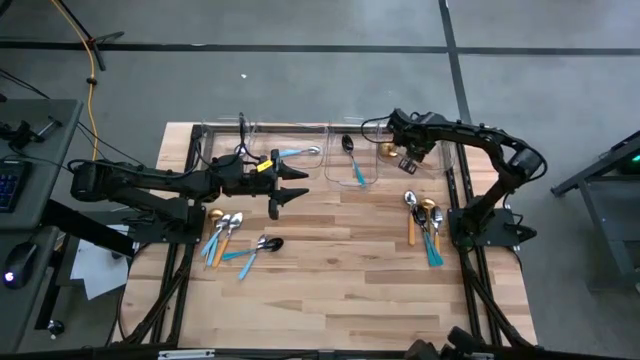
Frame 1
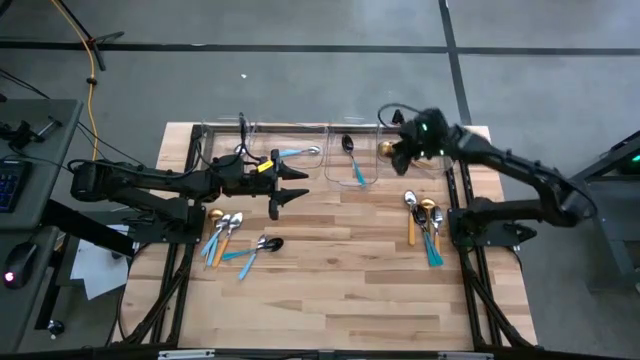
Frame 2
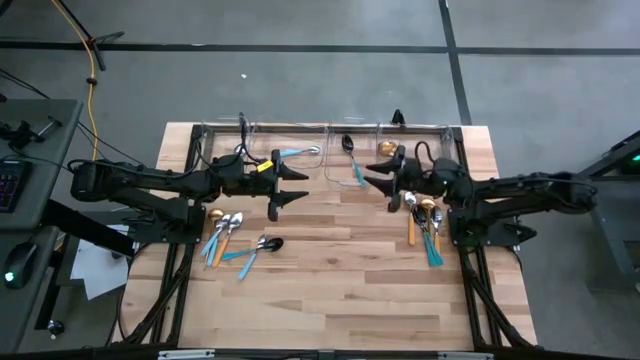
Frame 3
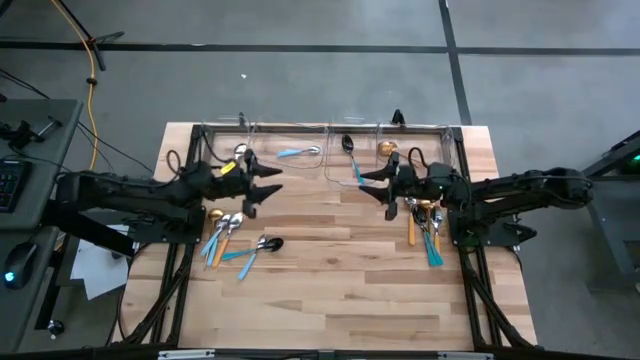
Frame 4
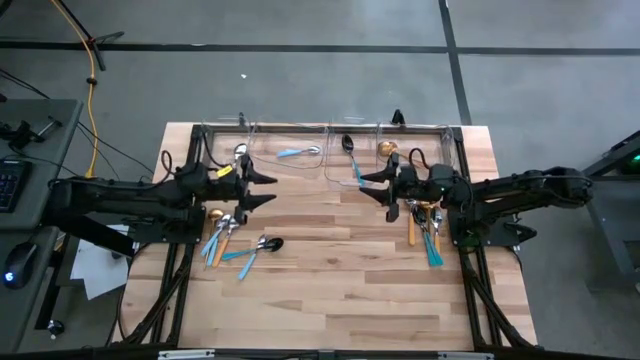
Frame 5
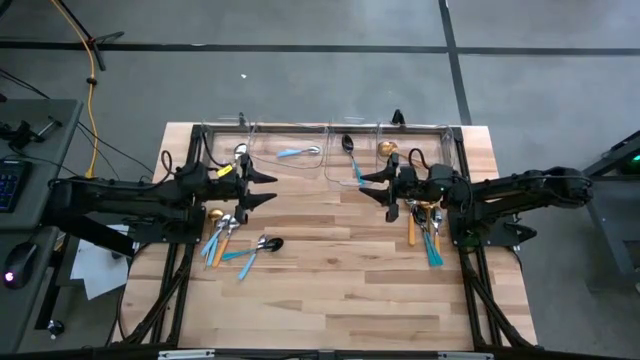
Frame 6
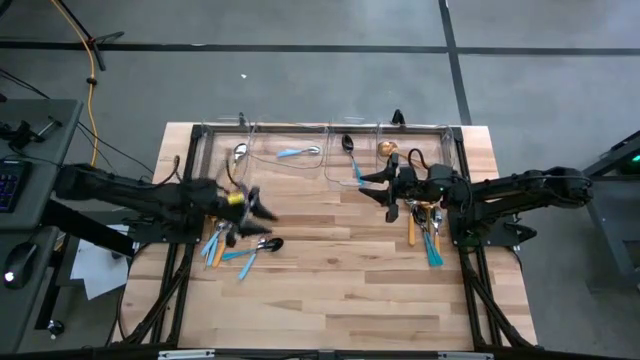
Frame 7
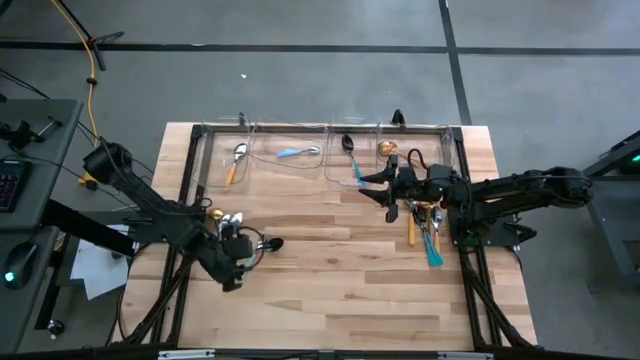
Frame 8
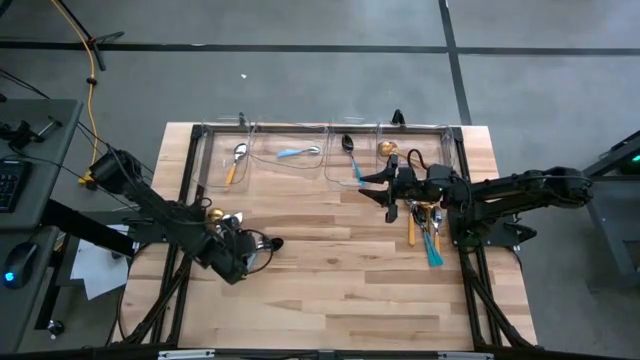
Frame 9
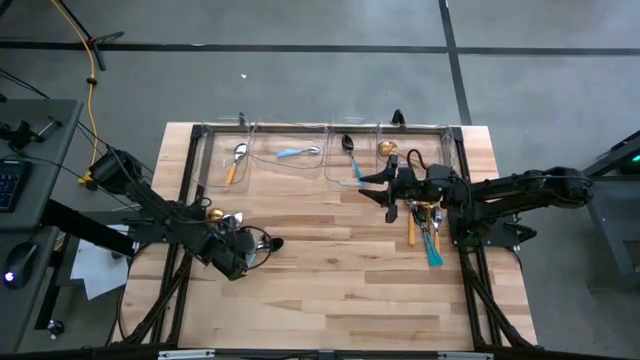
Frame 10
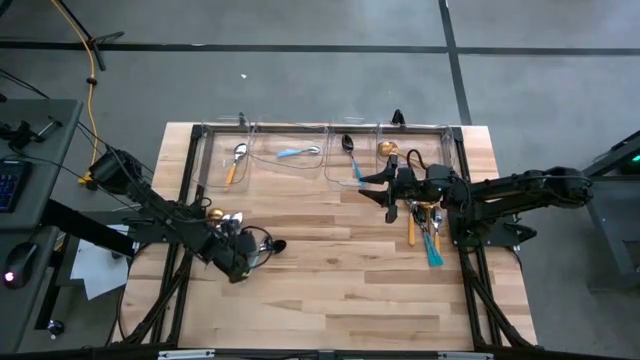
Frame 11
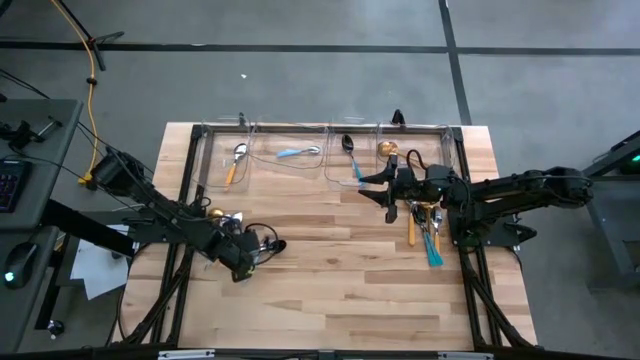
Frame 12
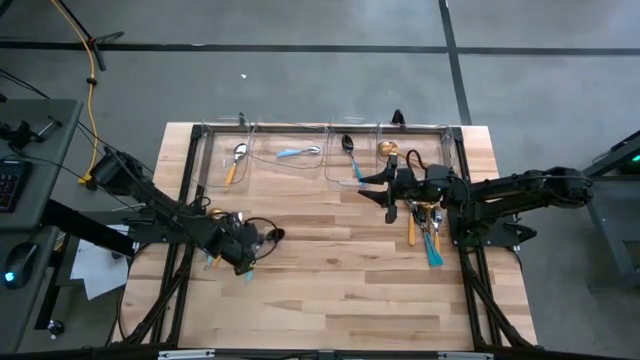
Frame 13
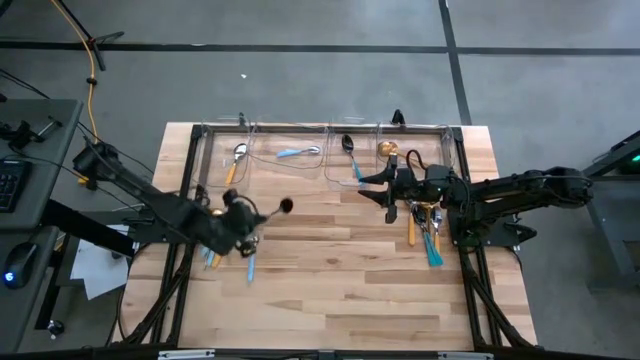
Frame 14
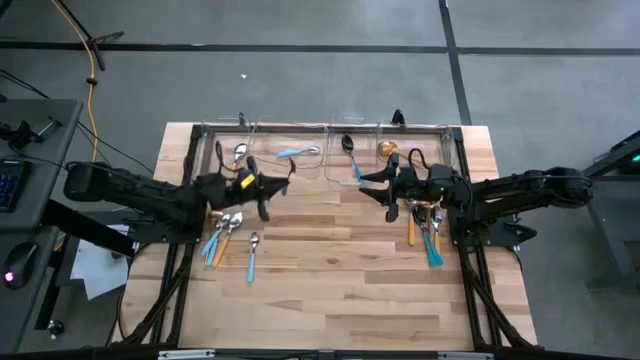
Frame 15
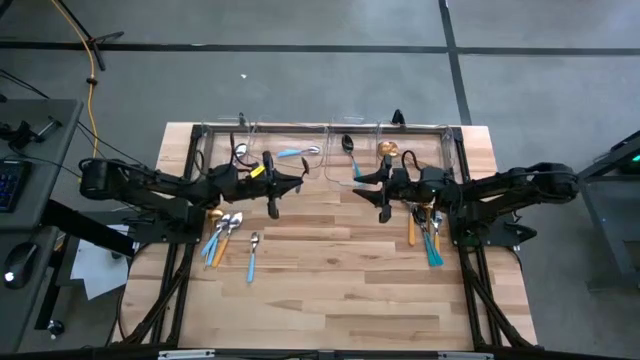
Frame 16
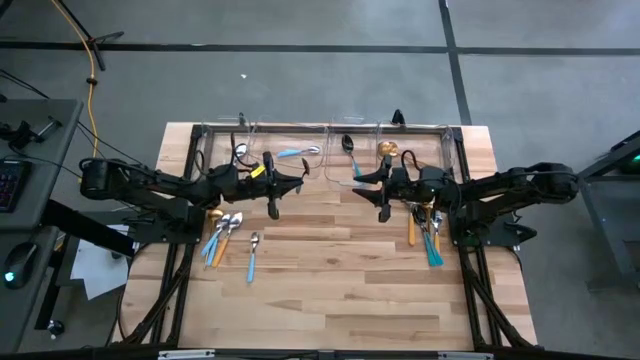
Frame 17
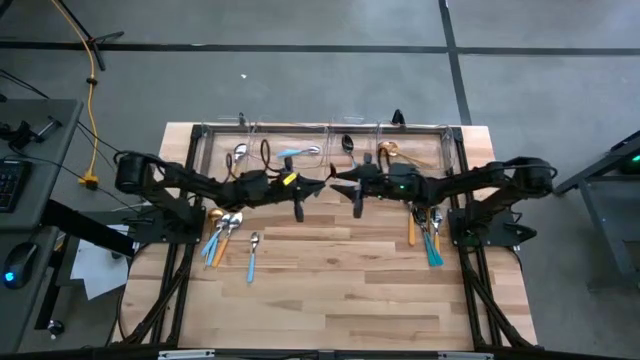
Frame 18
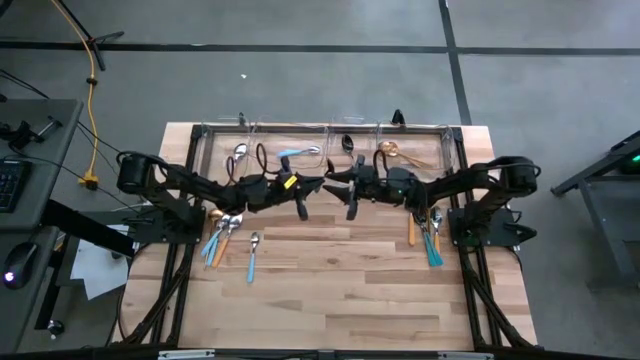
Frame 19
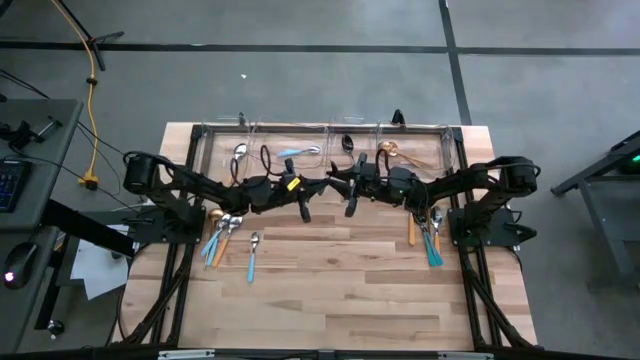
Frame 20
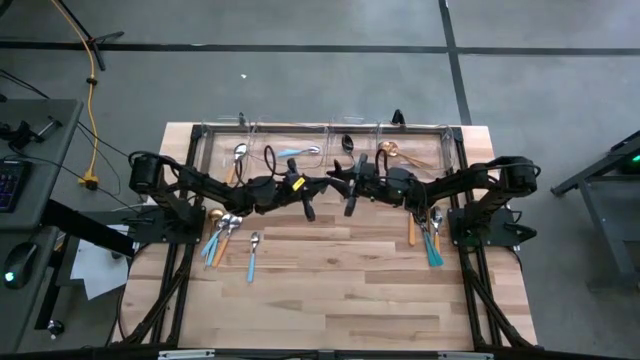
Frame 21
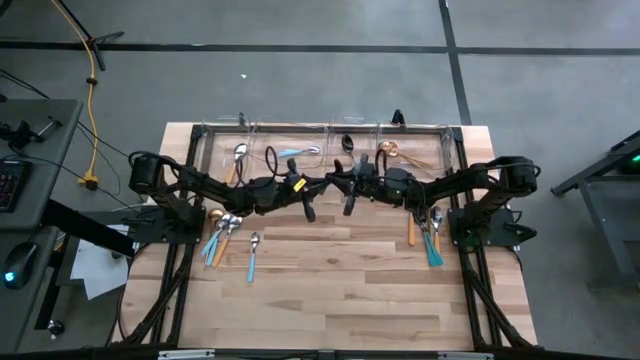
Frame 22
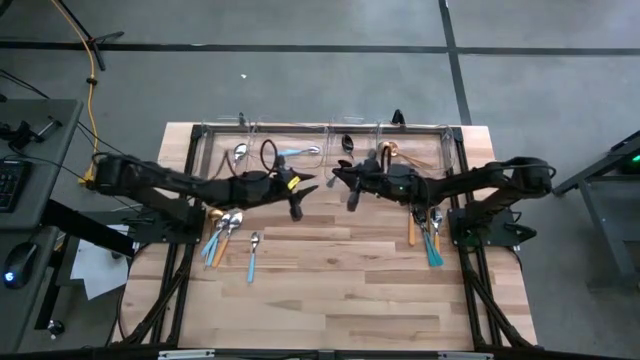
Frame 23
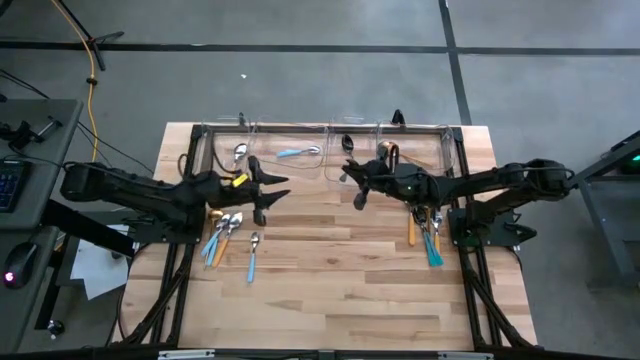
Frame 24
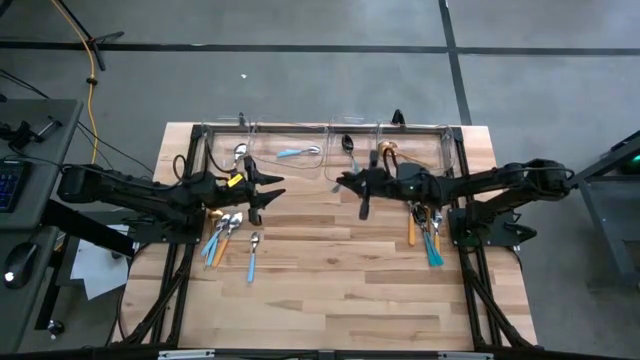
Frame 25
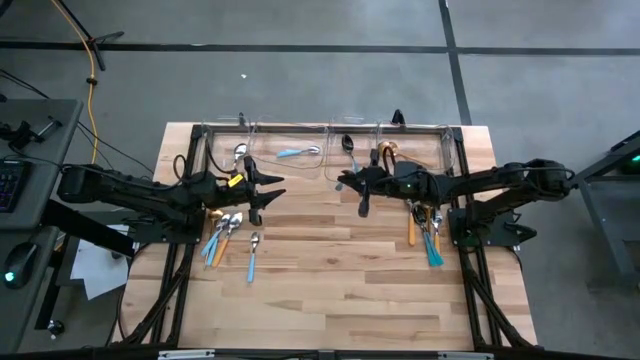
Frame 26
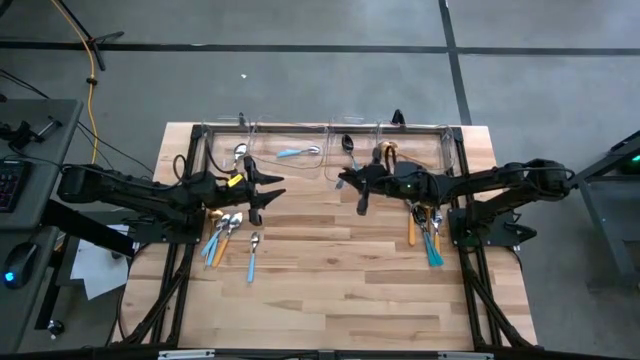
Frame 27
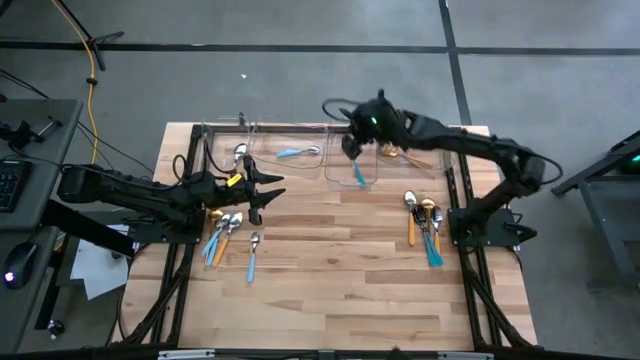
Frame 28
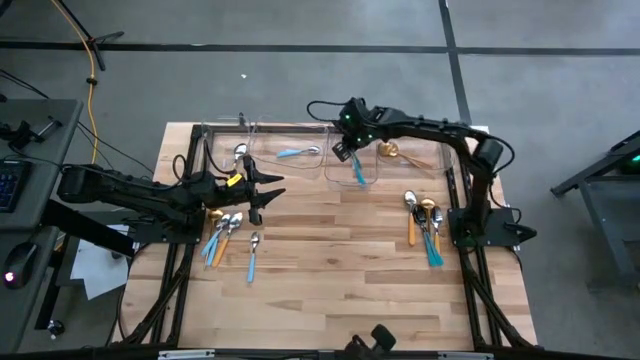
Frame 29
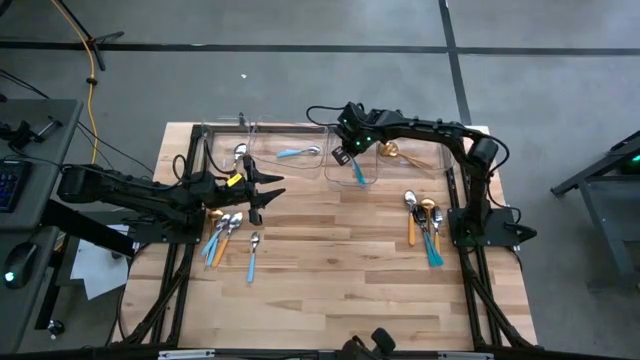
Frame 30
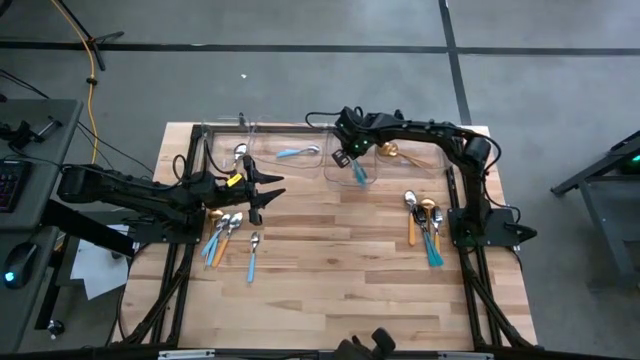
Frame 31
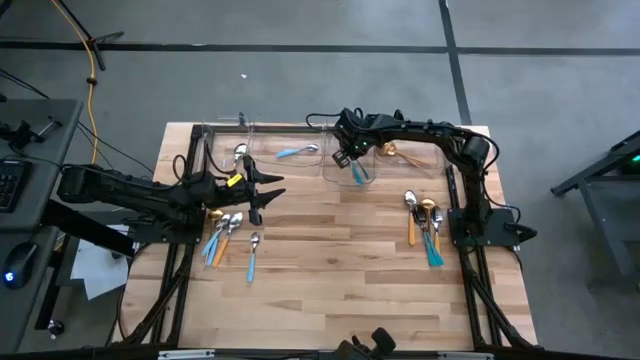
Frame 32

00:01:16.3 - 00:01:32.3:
Task: Sort silverware by color (type)
Put the black spoon into the middle right transparent bin

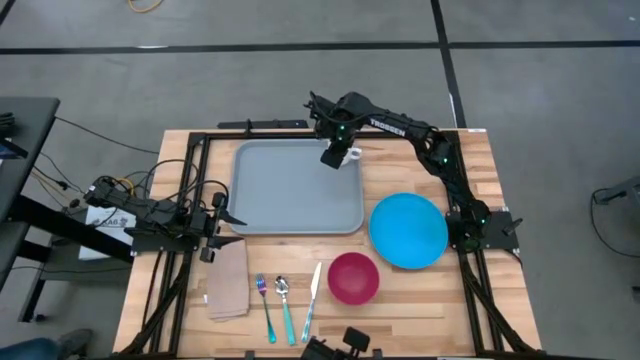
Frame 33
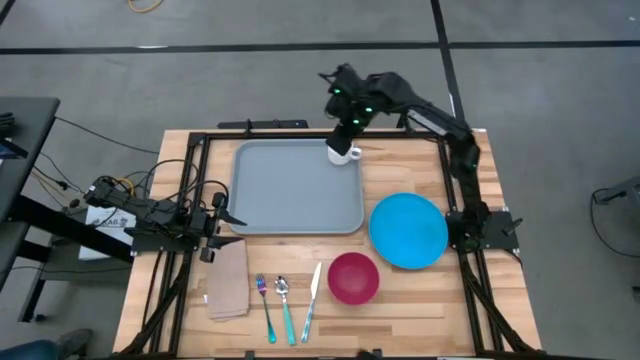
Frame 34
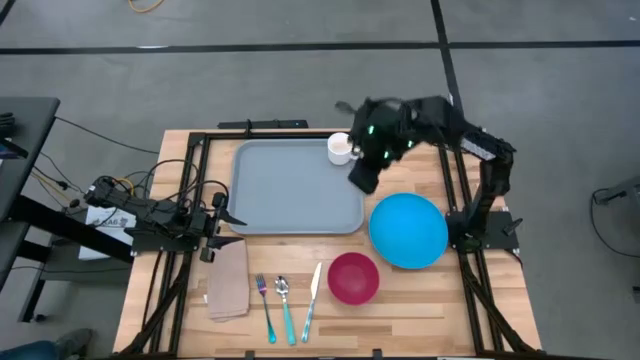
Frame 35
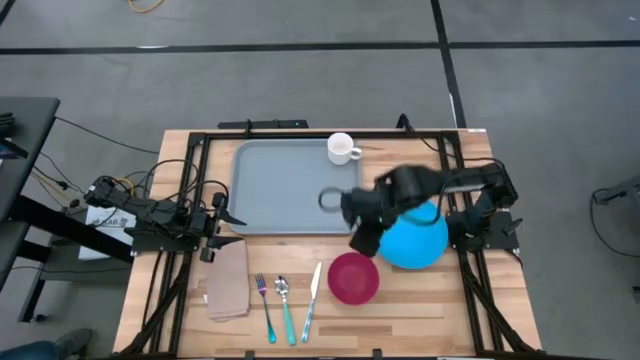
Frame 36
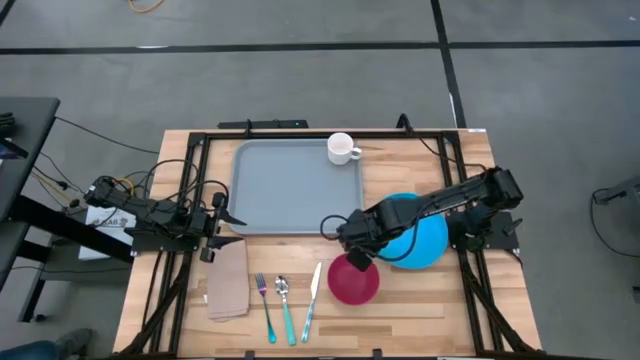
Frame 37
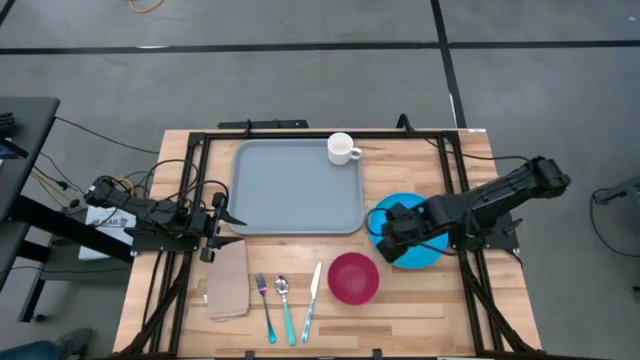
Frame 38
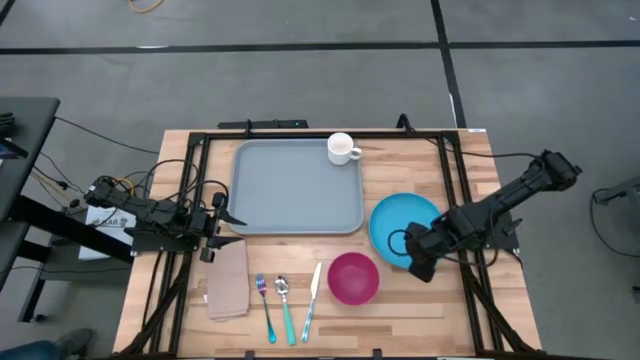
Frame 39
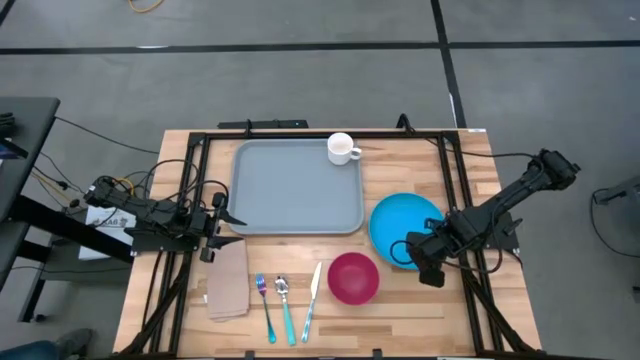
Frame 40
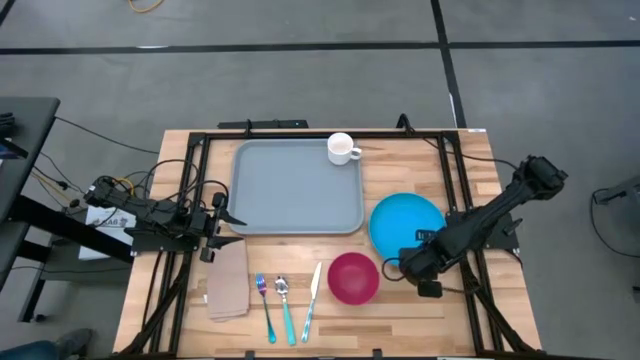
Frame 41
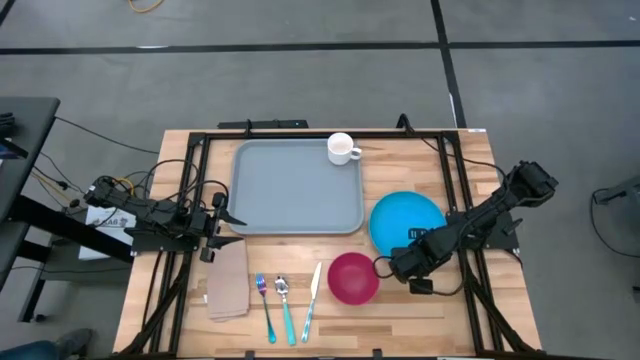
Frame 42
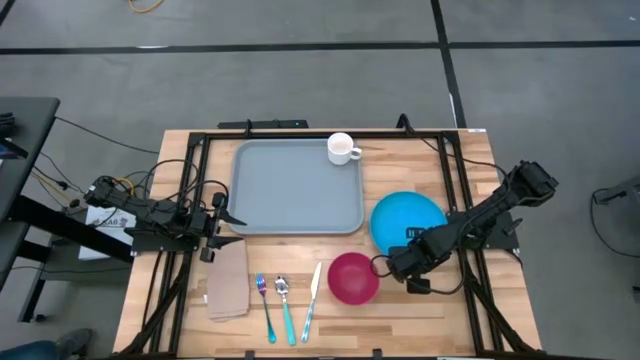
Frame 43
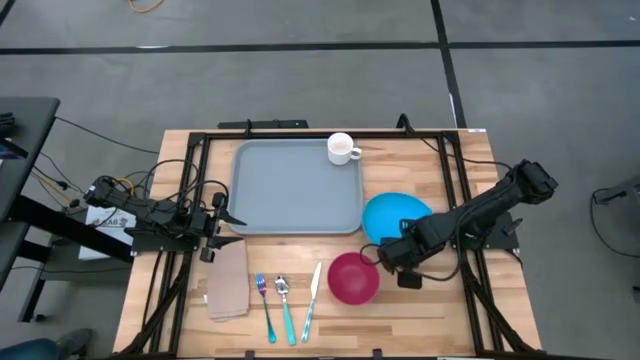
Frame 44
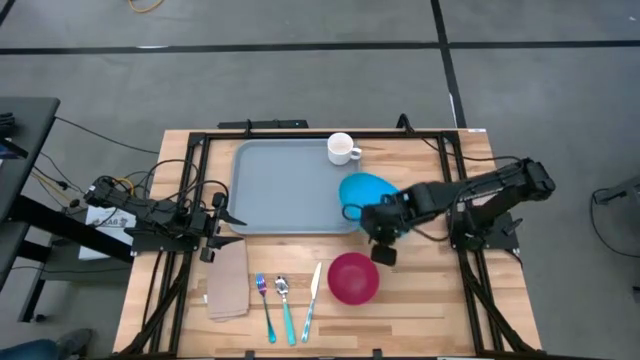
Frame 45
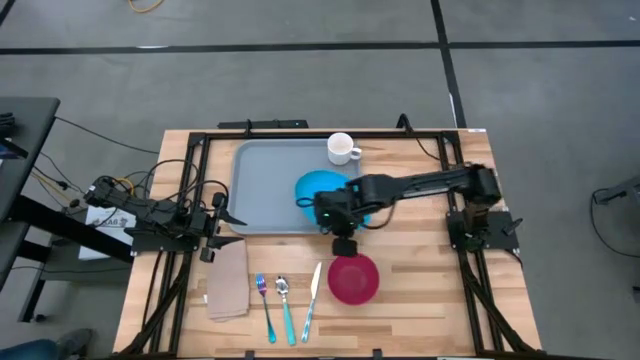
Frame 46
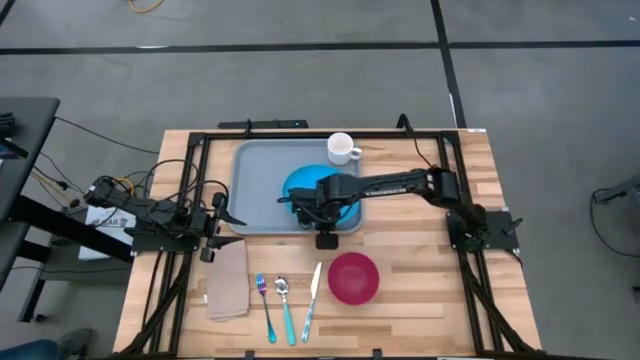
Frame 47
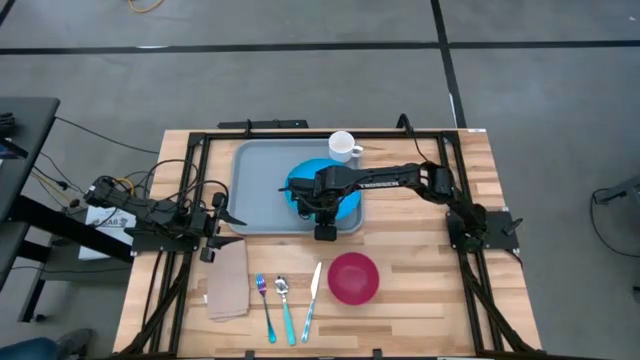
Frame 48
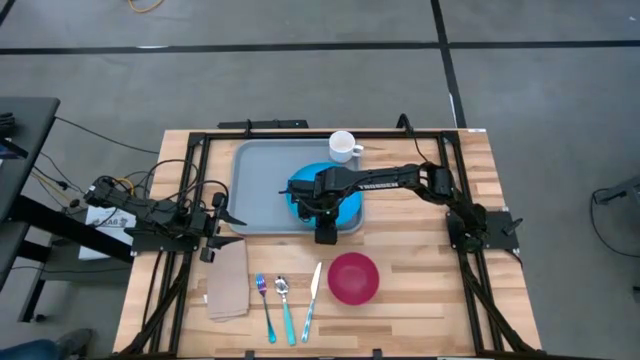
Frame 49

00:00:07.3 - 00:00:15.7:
Task: Set up tray
Put the blue plate on the gray serving tray to the bottom left of the white cup
